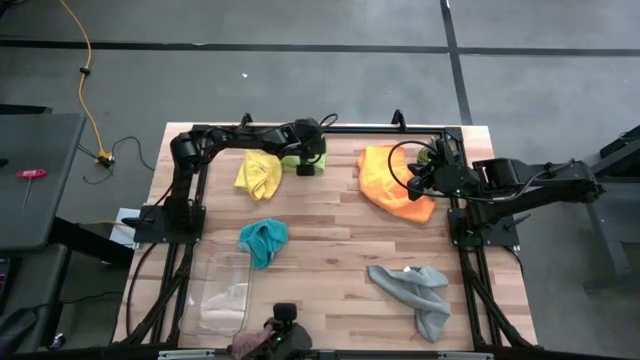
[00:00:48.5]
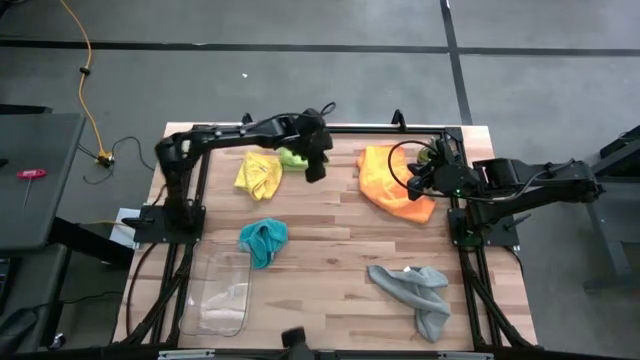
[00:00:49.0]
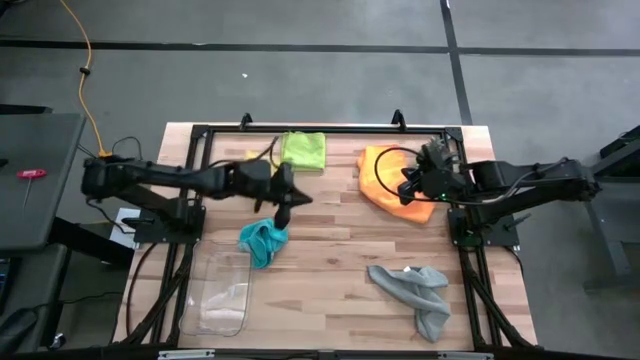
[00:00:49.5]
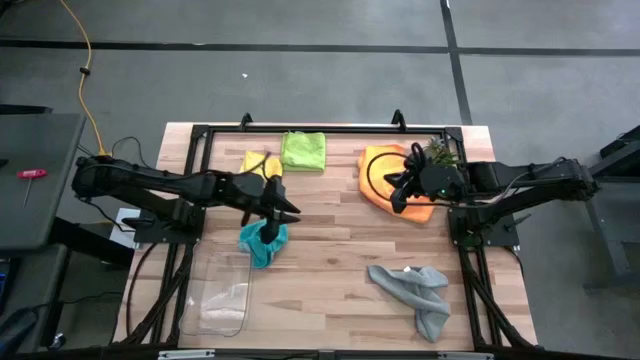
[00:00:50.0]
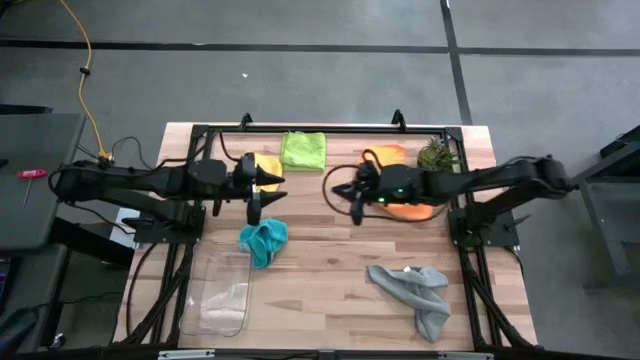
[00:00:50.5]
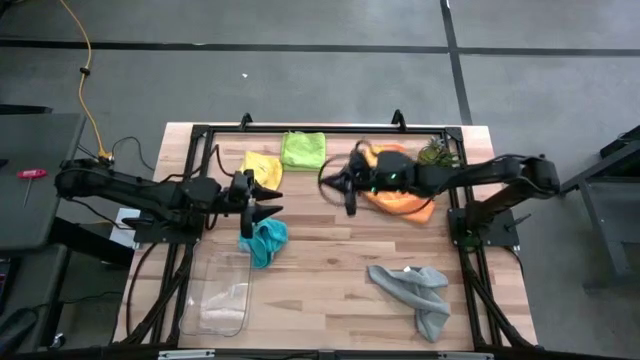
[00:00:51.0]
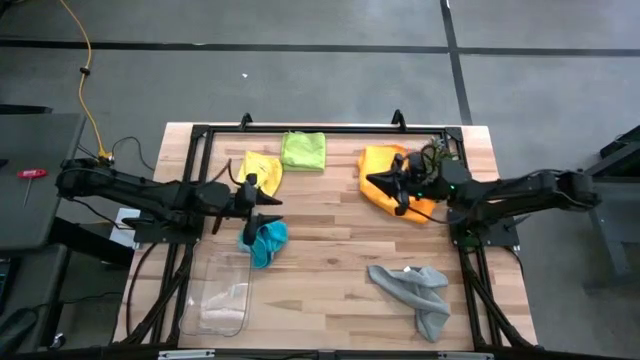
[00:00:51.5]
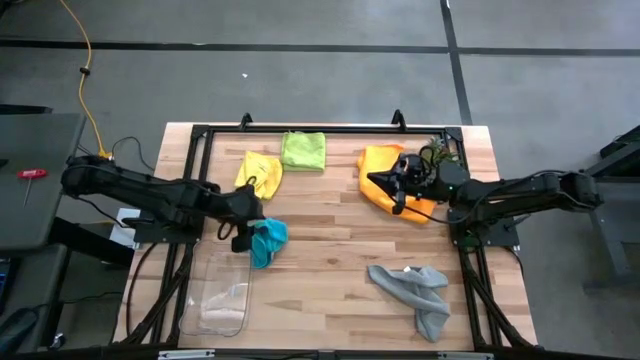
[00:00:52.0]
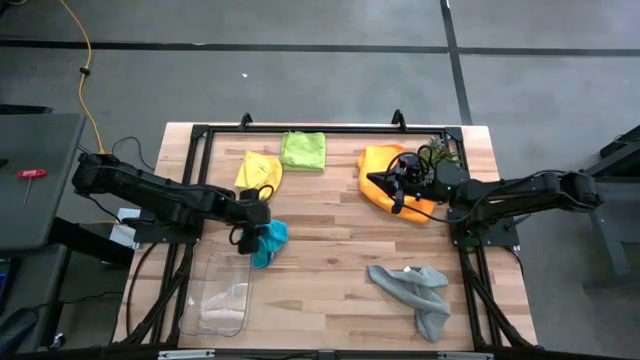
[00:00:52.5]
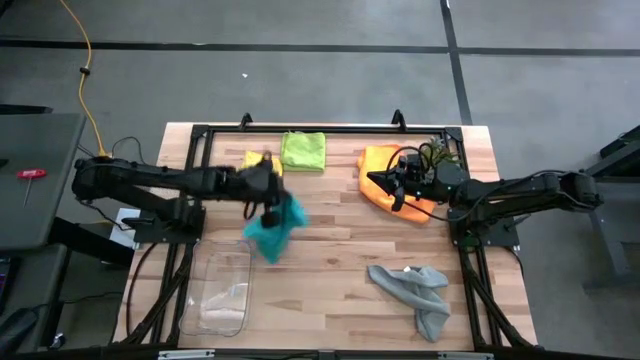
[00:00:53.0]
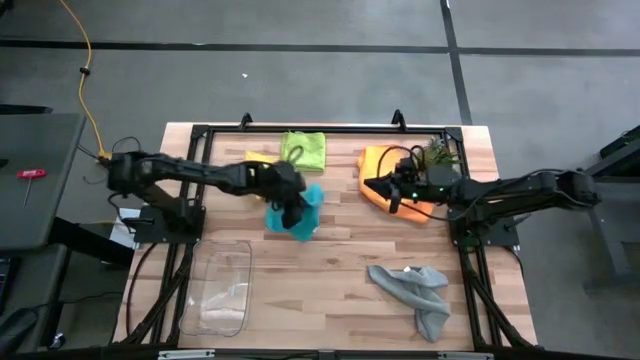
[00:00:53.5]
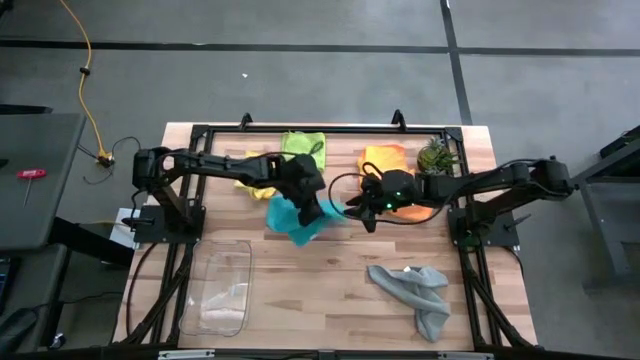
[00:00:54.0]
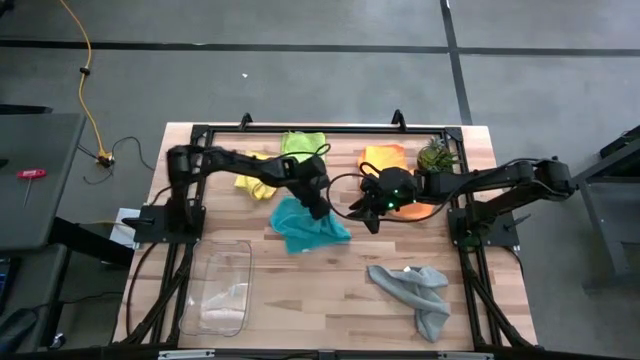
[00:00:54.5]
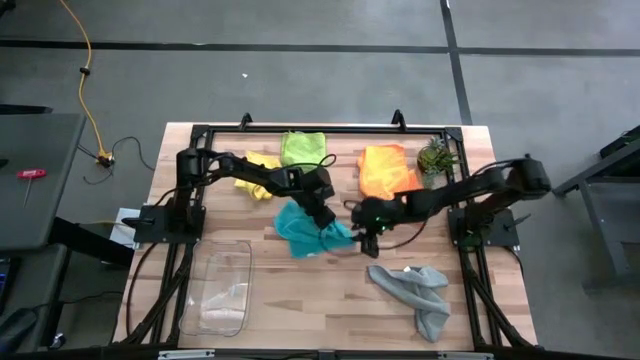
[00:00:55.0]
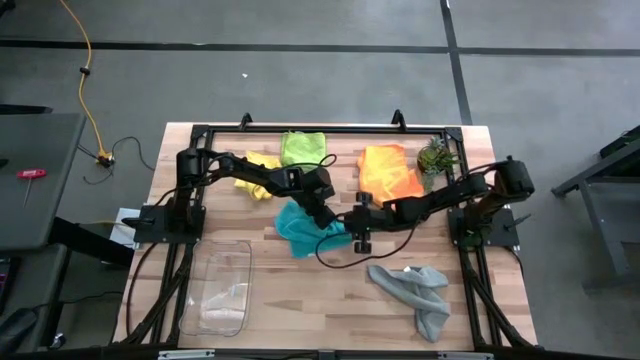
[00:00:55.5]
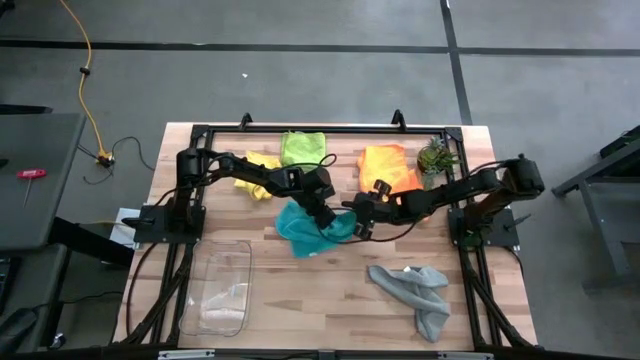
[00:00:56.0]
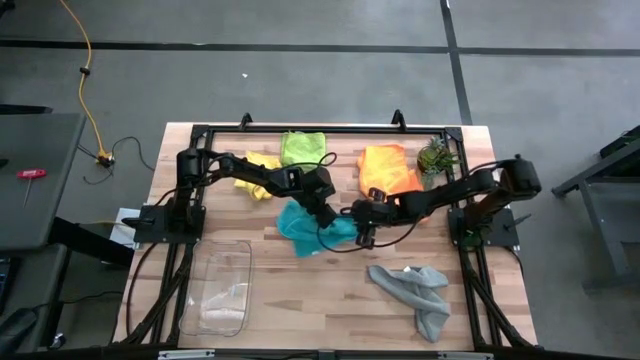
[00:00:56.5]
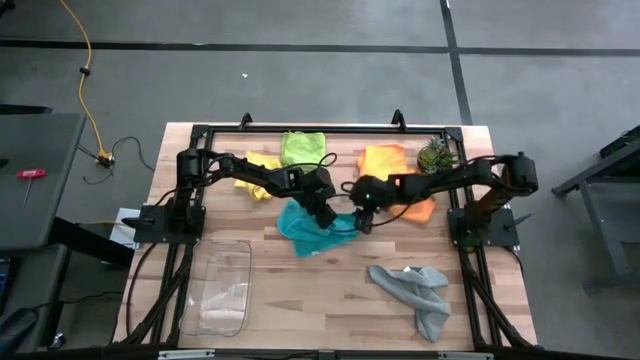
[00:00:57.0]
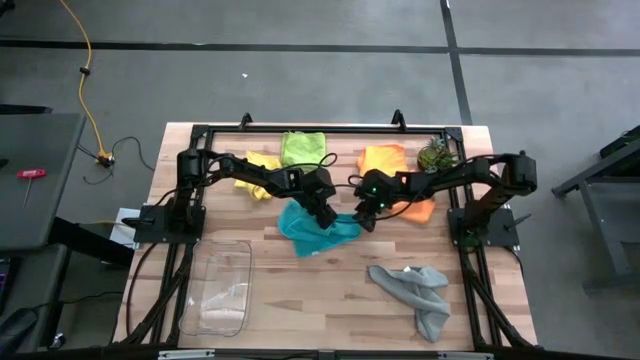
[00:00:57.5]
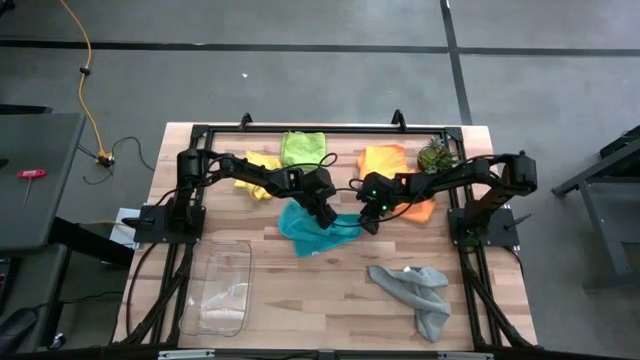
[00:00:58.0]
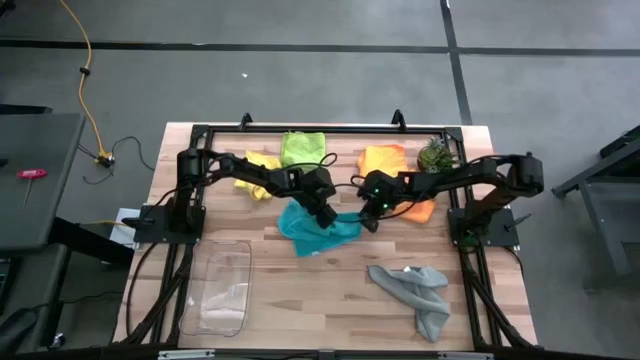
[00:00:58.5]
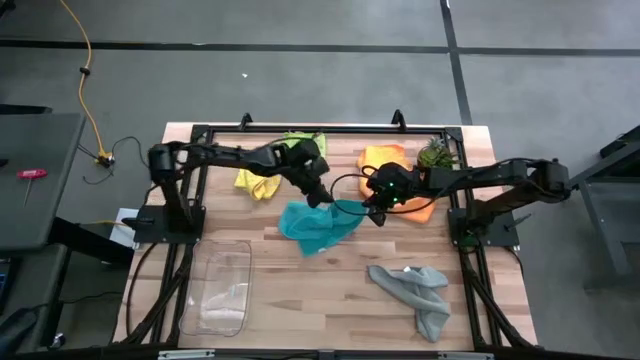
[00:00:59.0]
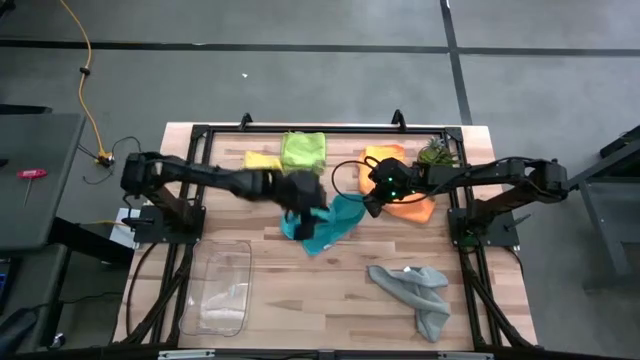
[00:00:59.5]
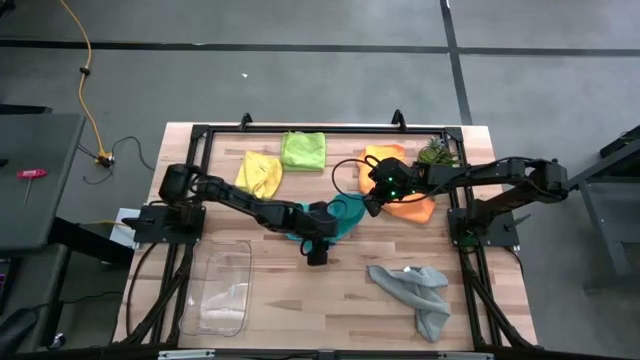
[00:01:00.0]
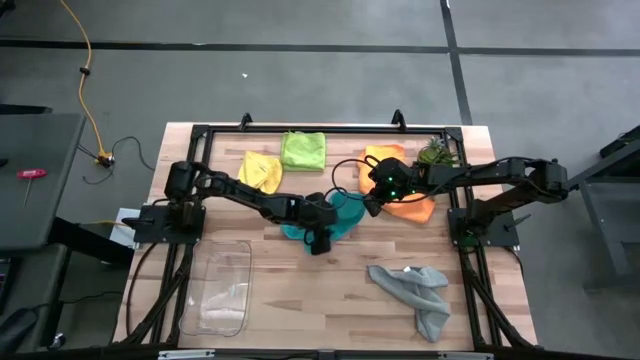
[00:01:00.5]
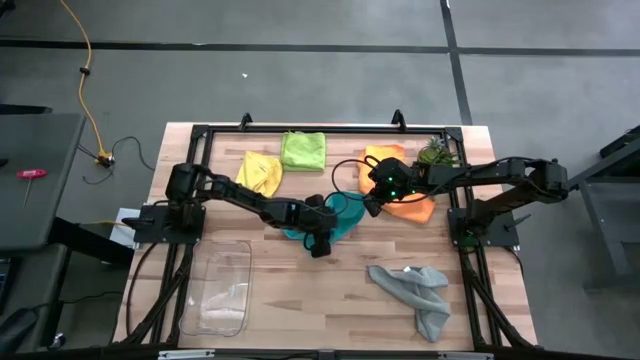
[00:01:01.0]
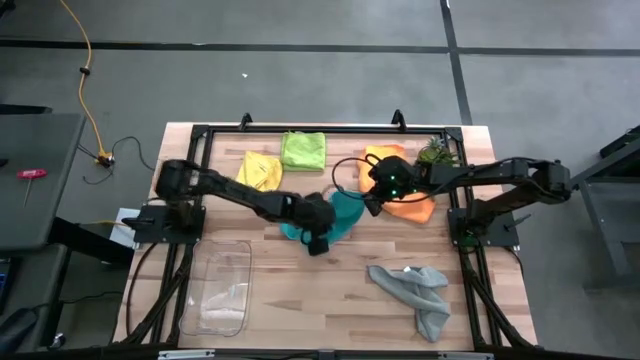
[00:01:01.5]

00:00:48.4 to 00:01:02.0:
Task: Fold microfiber towels
Fold the blue microfiber towel

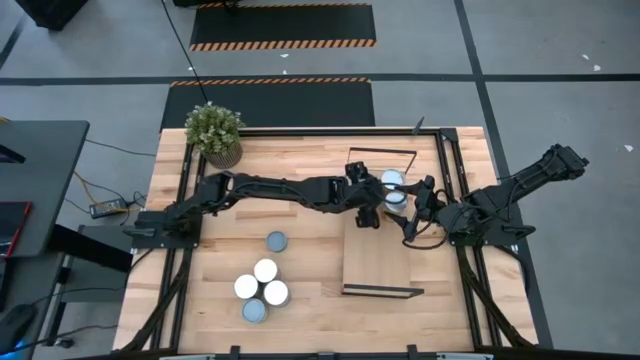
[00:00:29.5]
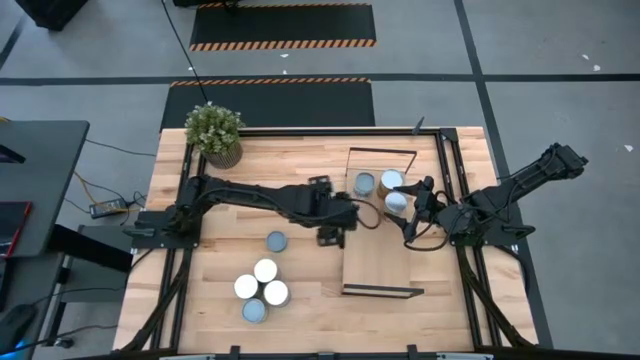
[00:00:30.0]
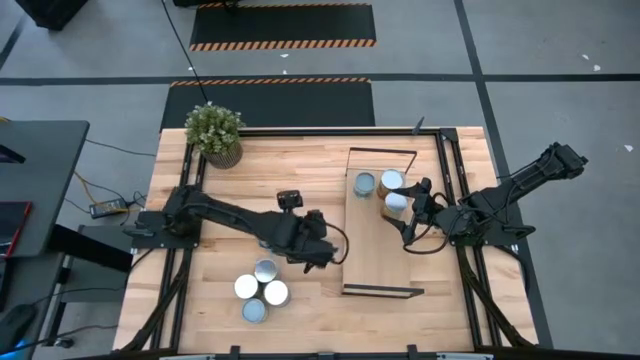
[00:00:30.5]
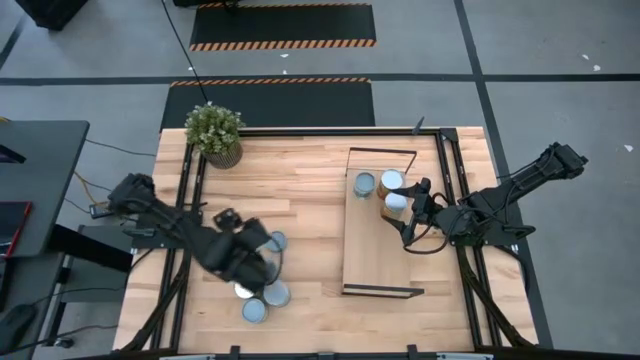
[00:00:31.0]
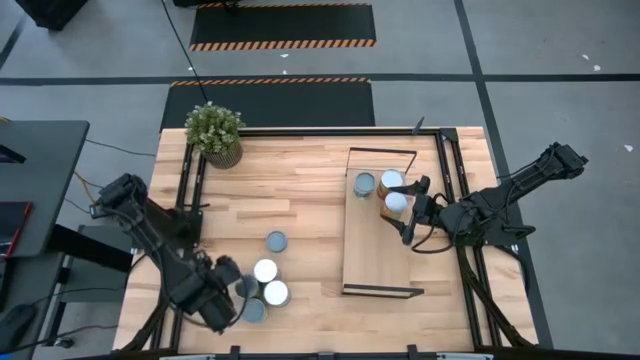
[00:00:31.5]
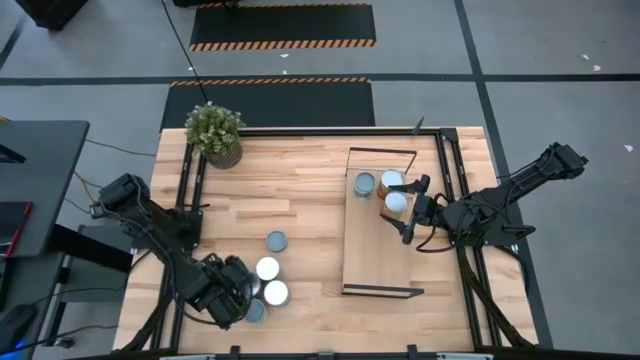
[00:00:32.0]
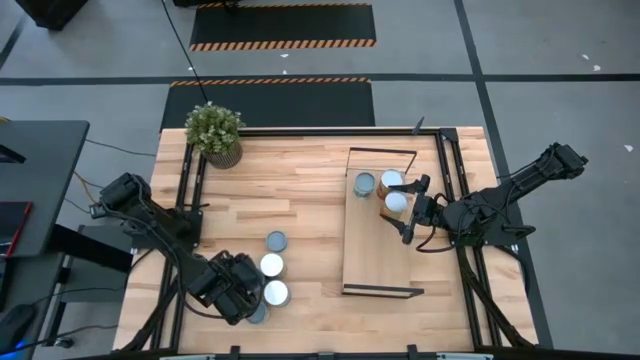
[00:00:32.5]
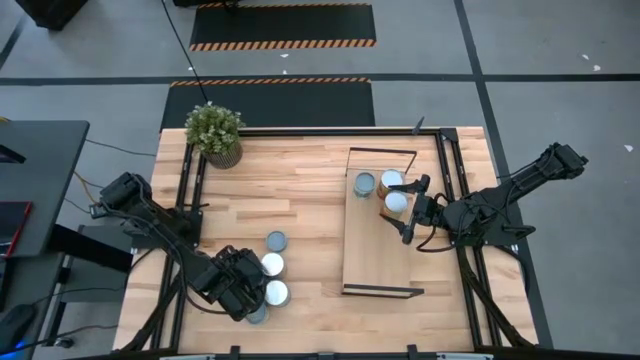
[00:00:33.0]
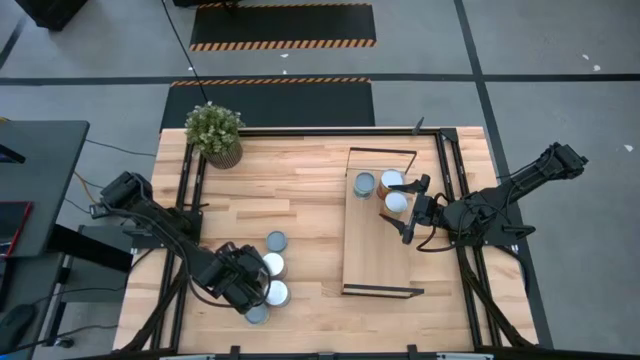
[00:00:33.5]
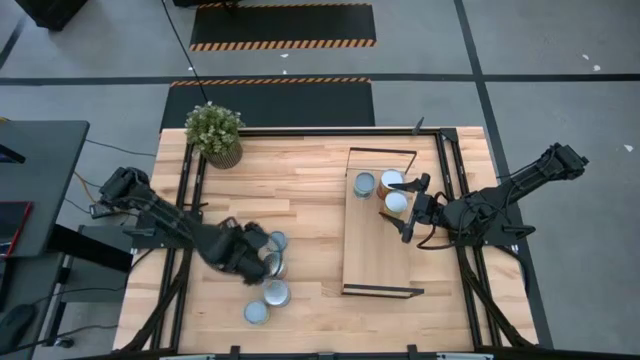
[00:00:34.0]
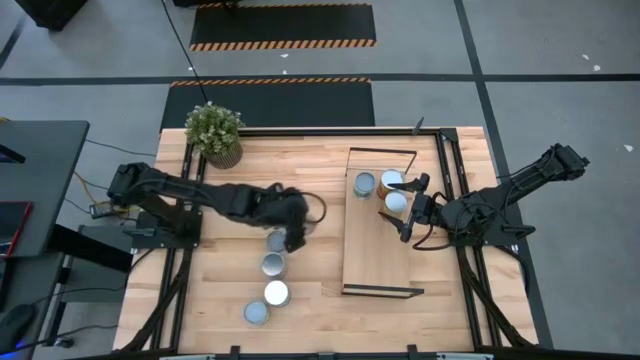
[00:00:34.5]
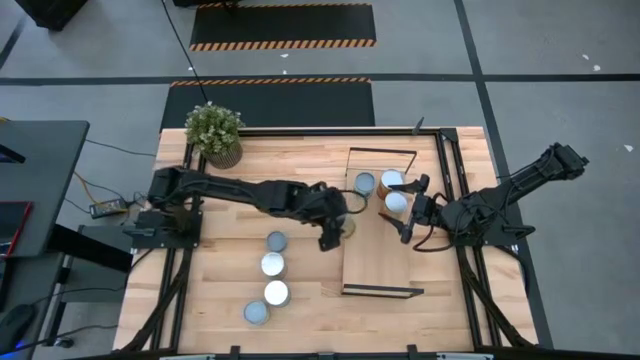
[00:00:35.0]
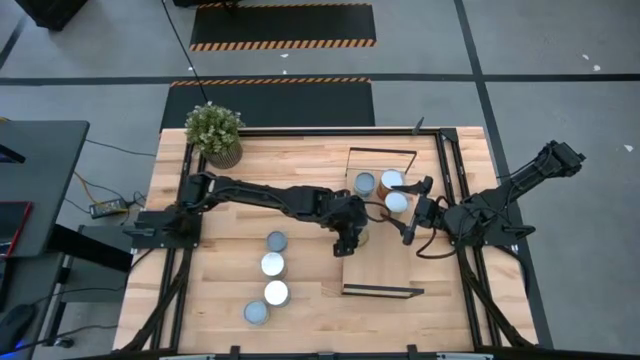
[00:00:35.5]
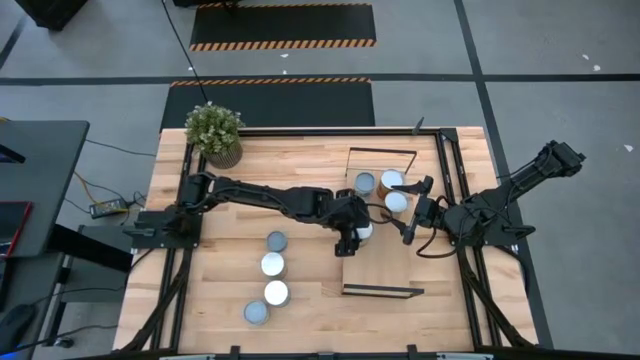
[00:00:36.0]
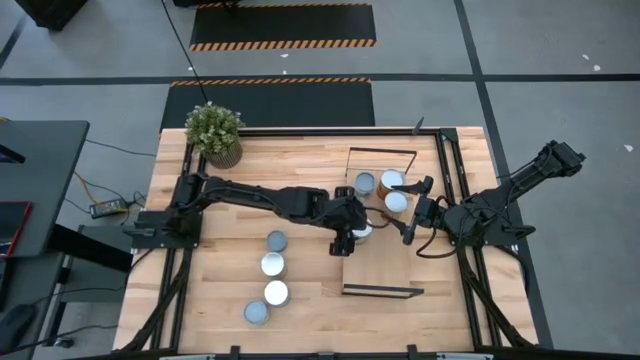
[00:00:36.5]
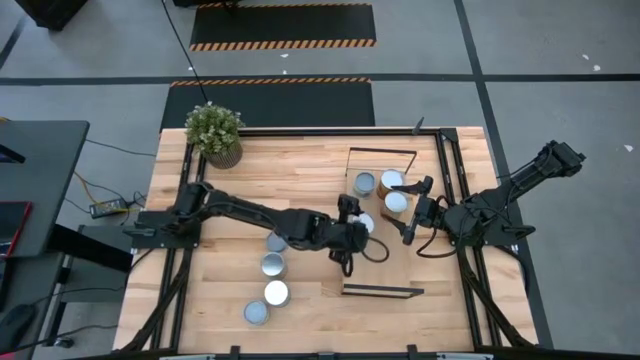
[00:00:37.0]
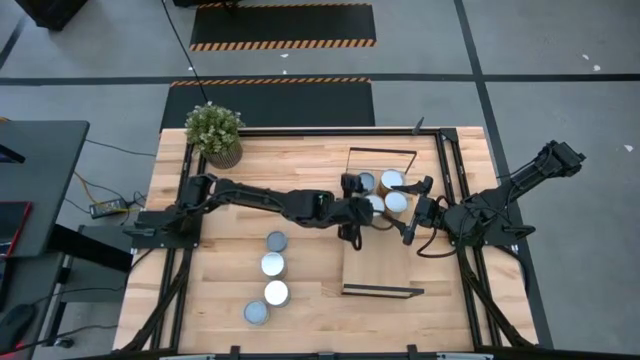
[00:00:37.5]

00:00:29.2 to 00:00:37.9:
Task: Pick and place cans onto a shelf
Put the canned oranges on the shelf
